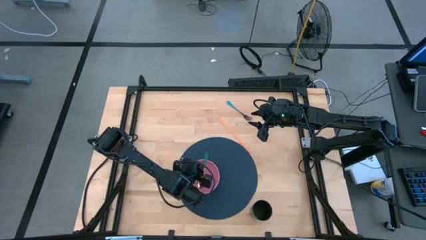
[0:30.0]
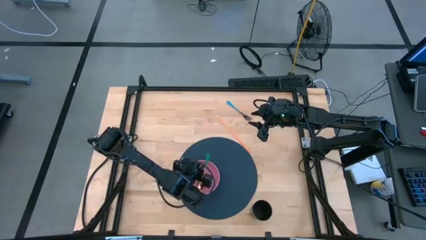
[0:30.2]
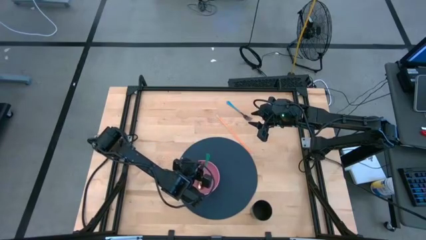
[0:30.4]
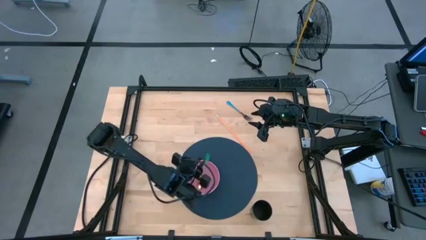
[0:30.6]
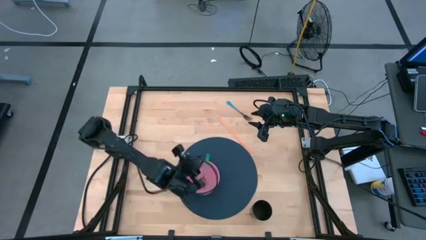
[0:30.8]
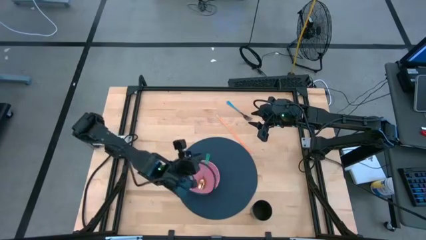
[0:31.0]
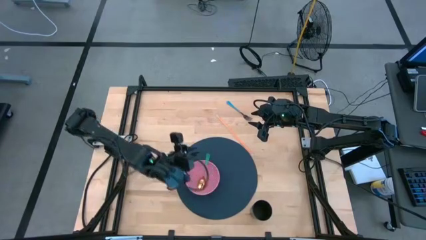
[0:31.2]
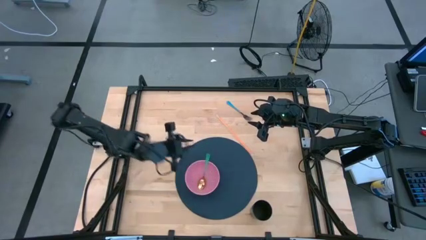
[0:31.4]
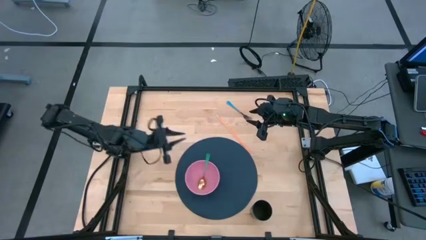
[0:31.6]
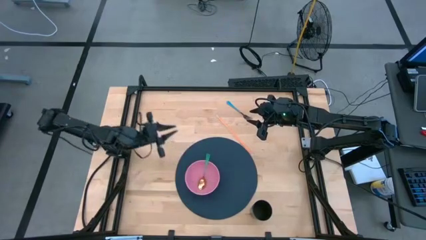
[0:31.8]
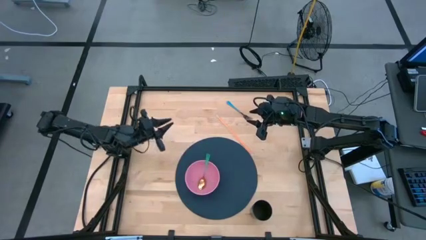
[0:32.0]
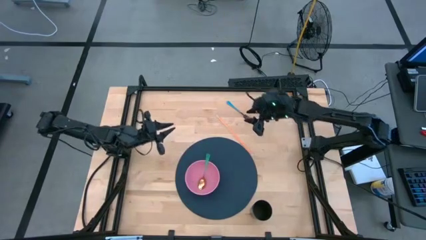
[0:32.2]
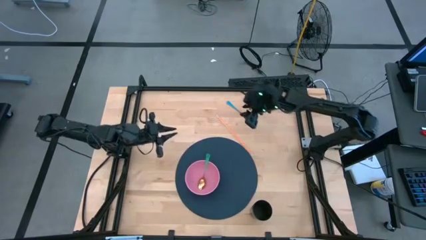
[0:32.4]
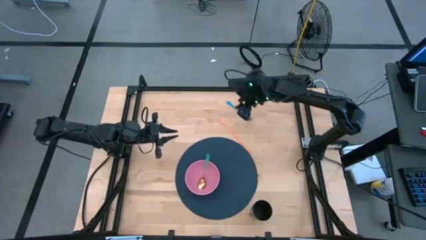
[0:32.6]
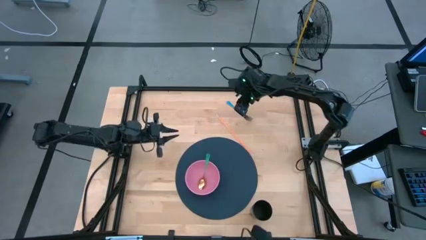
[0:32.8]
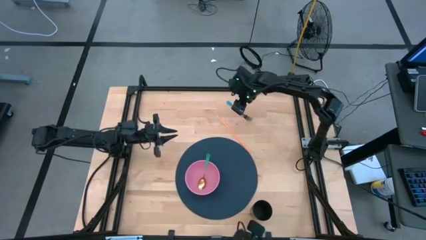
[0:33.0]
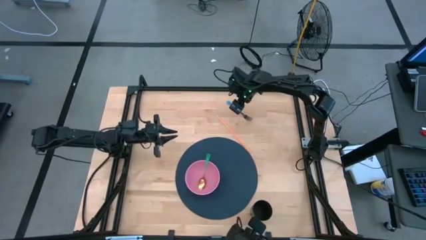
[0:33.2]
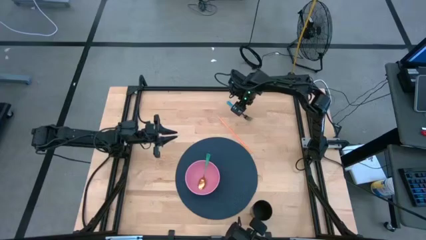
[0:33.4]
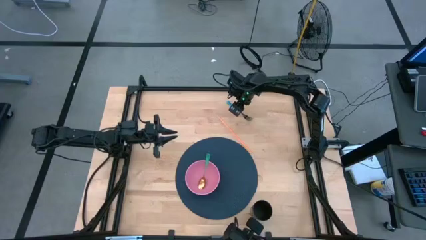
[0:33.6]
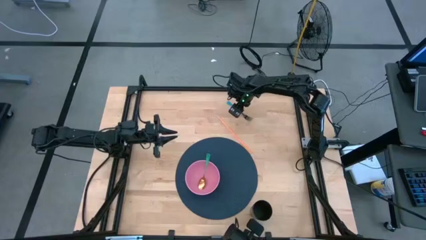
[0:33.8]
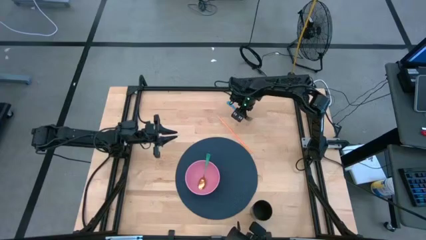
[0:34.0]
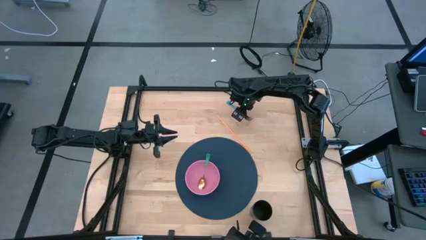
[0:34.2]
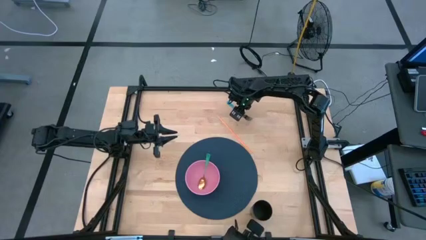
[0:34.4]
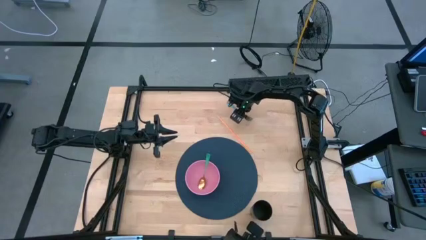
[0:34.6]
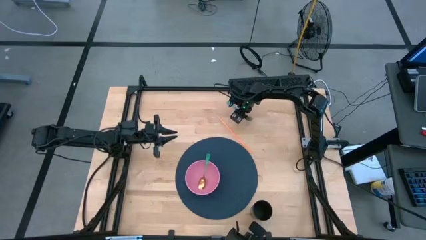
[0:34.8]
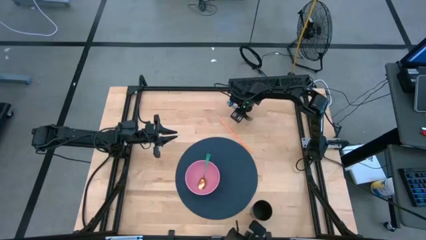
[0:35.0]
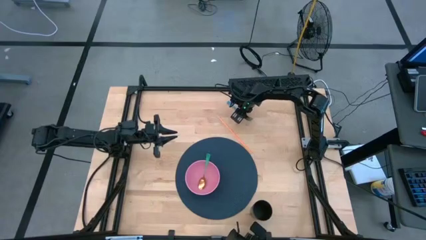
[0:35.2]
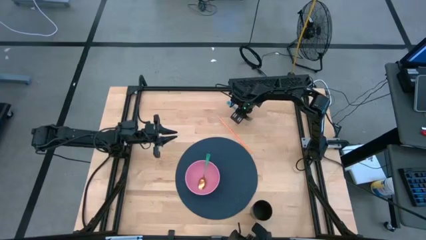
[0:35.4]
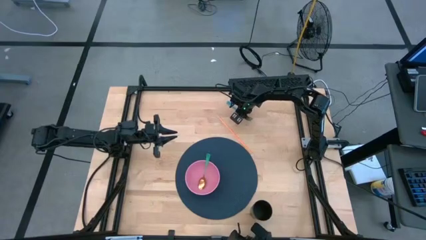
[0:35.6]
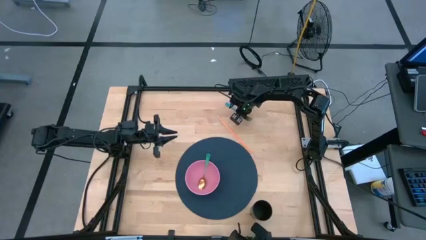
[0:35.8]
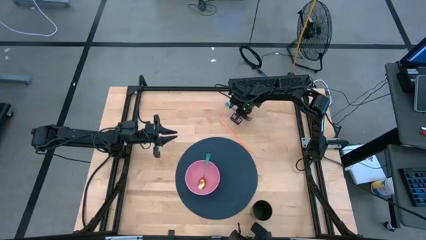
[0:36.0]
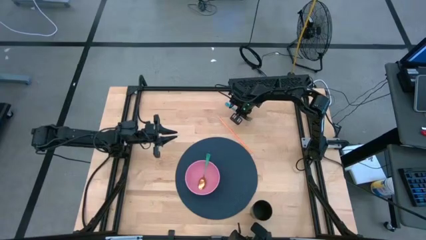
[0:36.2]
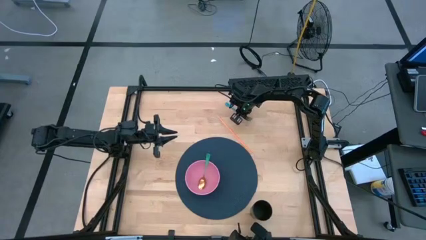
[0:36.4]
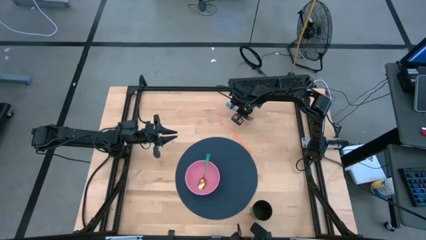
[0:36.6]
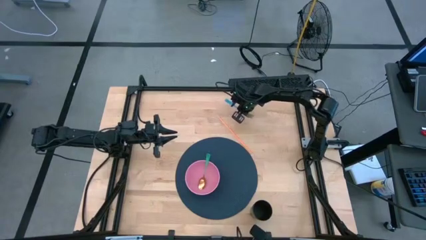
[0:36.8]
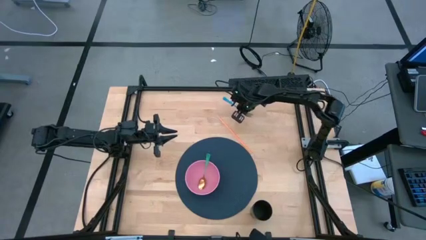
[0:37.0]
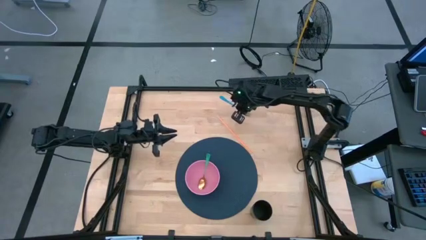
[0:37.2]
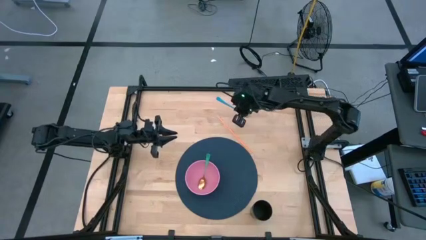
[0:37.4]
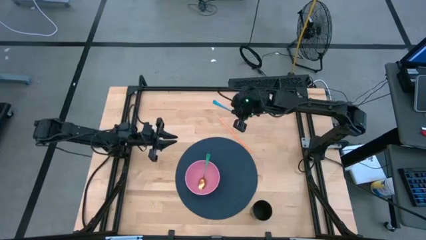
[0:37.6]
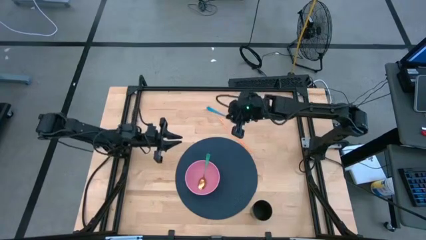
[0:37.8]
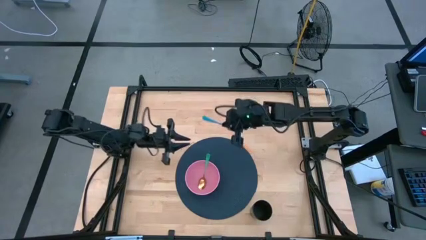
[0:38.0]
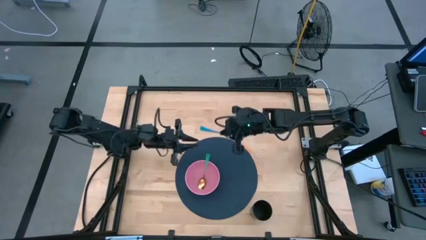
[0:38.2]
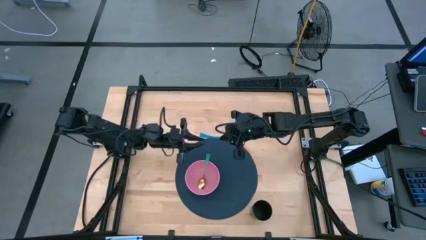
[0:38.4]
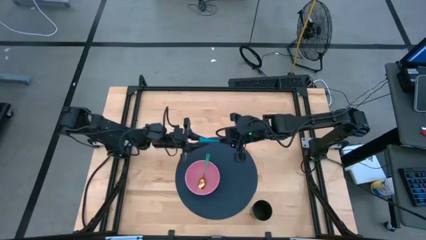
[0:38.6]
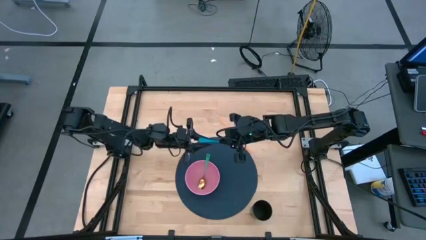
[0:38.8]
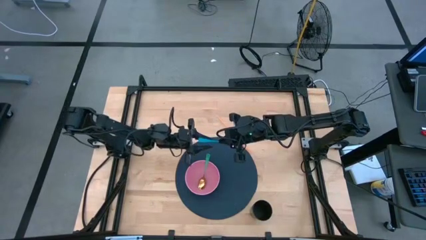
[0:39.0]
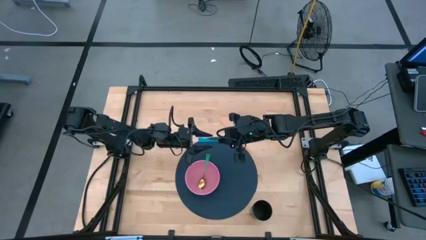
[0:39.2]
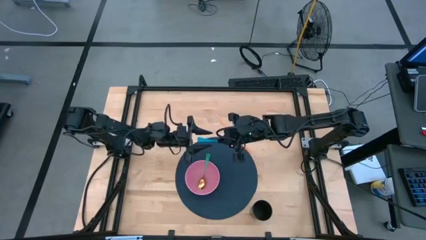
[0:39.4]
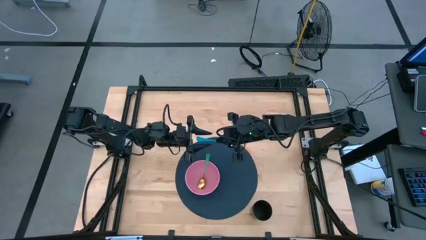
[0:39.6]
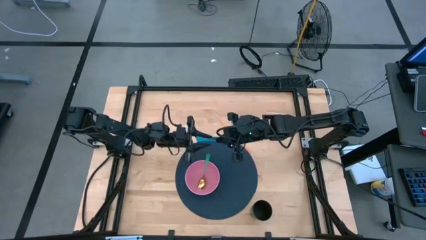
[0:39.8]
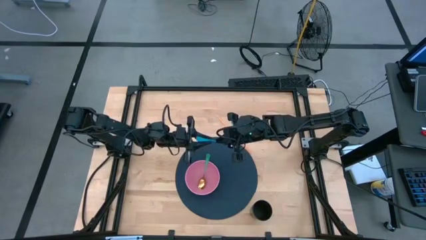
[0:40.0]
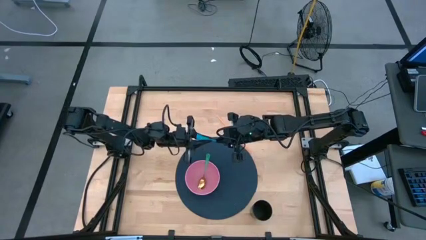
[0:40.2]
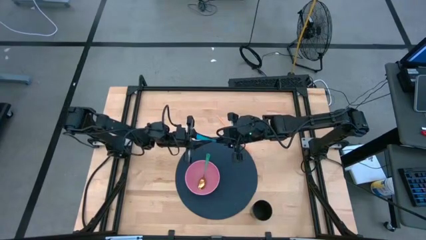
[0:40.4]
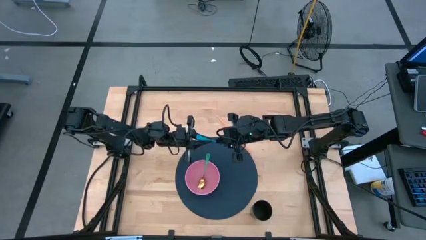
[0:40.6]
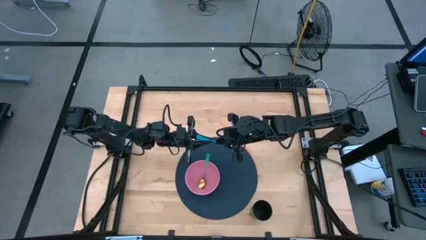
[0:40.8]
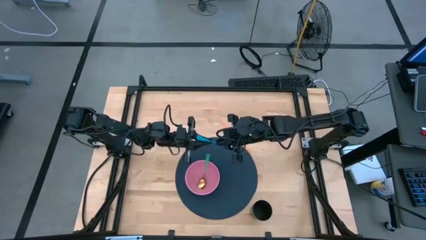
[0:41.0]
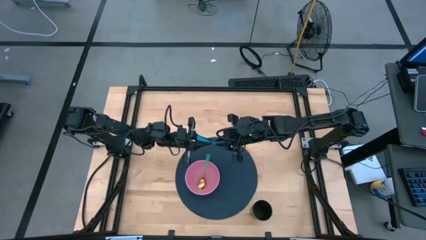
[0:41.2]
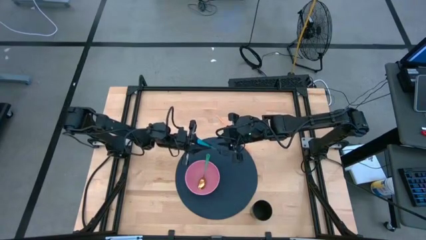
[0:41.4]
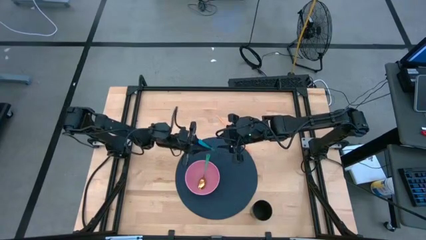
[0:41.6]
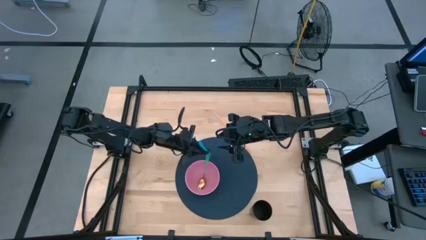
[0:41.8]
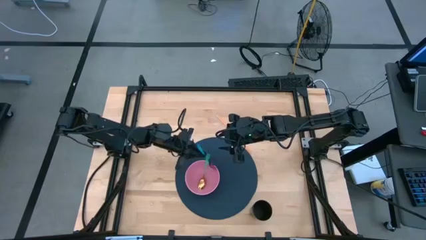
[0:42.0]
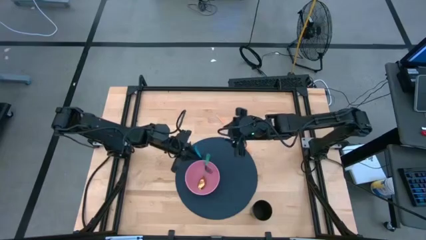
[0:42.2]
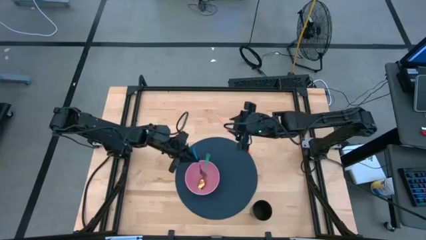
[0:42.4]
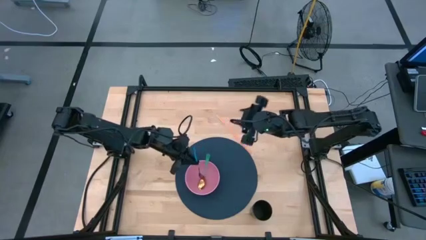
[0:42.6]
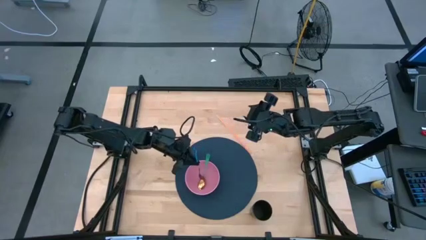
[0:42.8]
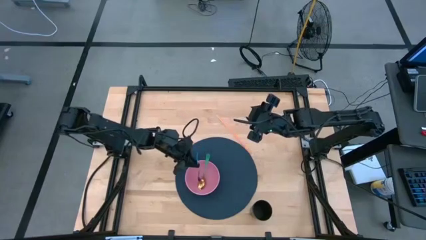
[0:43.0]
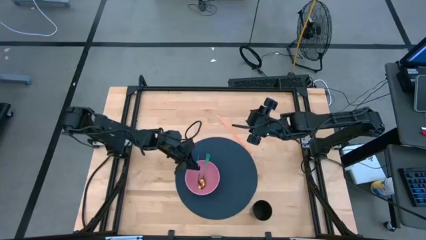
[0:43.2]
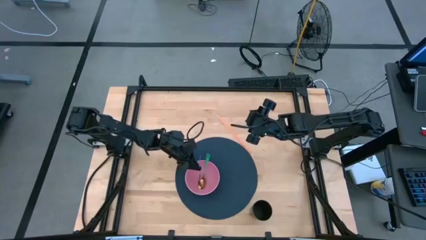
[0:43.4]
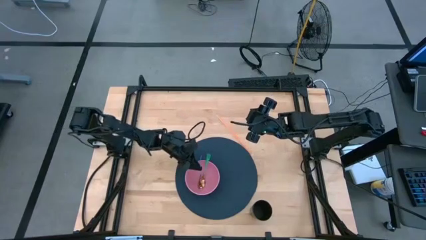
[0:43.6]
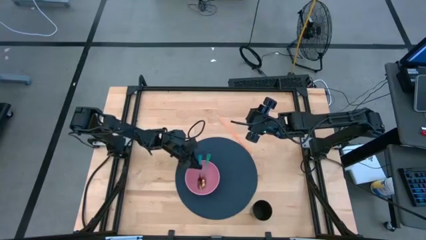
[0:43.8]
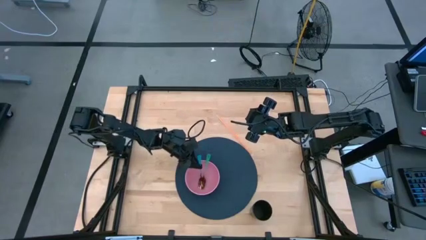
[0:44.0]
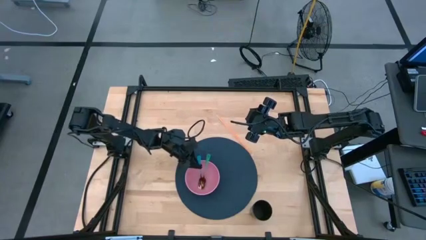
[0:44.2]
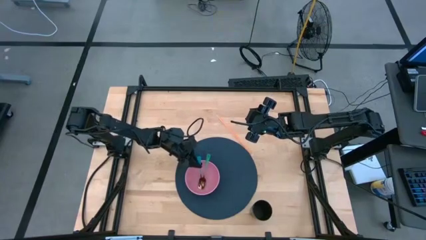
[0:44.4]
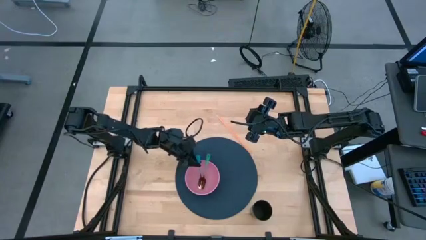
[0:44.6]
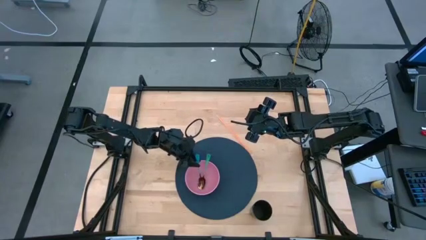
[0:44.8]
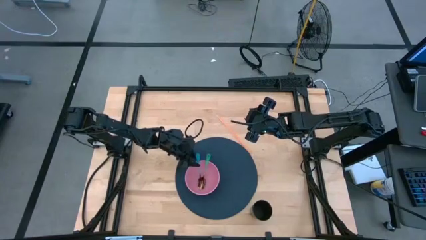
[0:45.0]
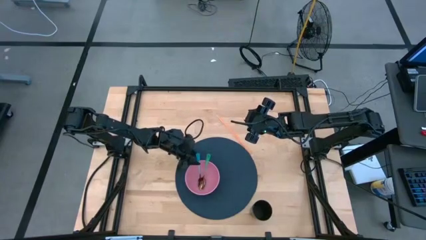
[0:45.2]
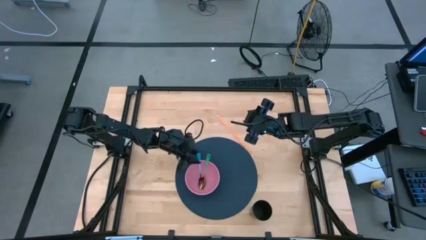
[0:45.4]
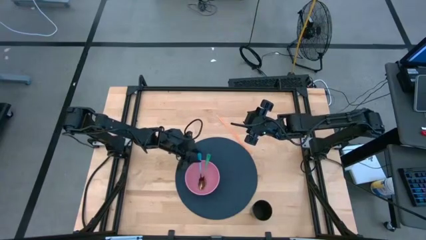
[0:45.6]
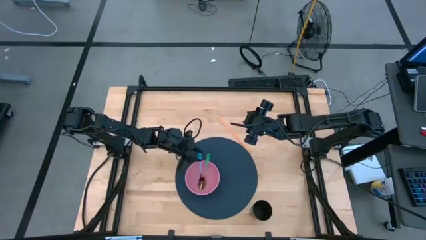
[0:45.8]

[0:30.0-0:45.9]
Task: Pick & Place Utensil
Put the blue fork into the pink bowl on the blue mat
